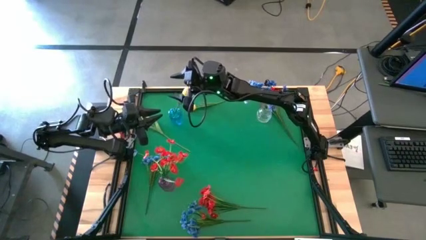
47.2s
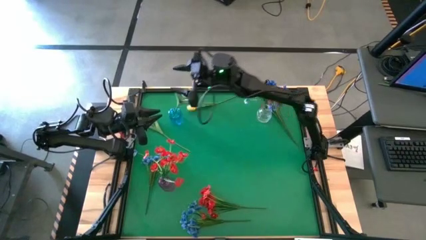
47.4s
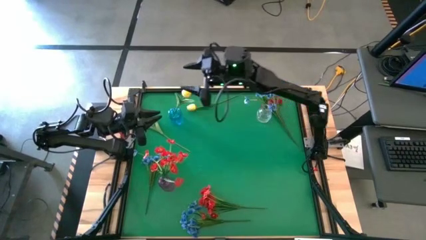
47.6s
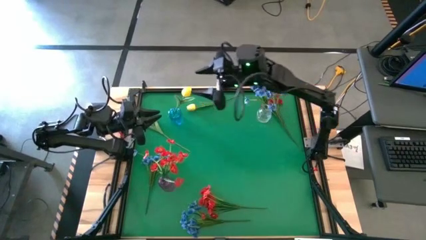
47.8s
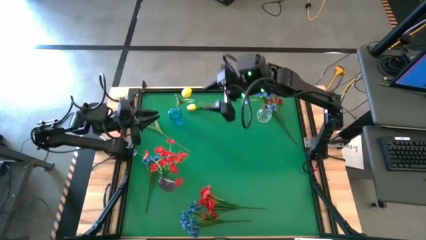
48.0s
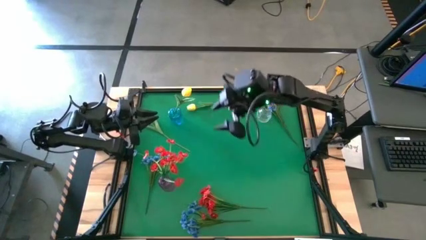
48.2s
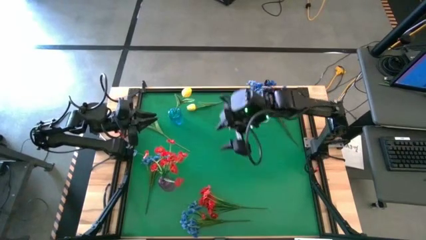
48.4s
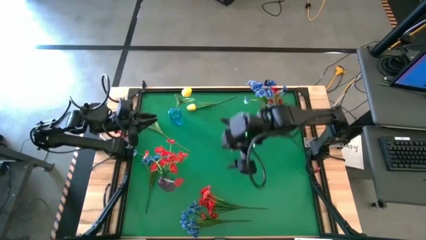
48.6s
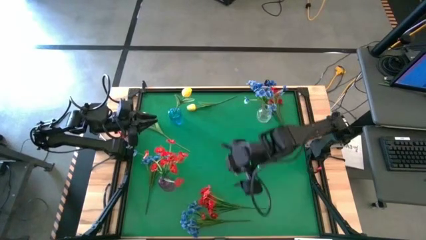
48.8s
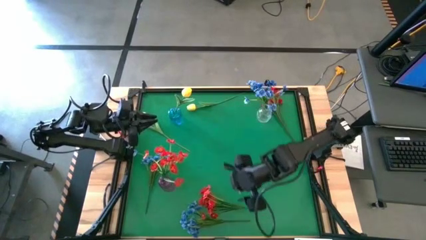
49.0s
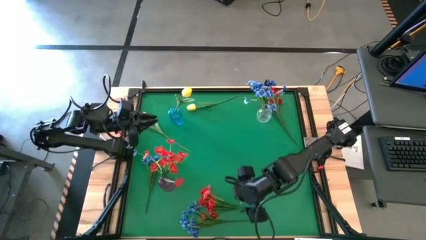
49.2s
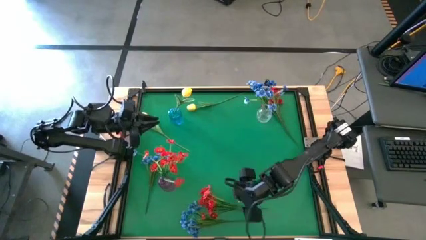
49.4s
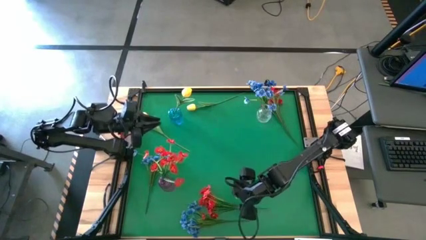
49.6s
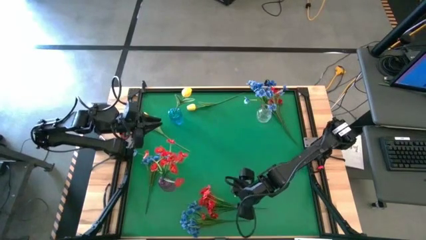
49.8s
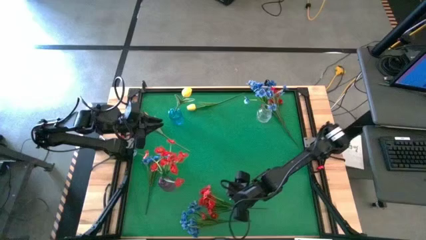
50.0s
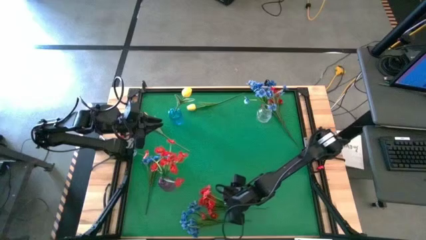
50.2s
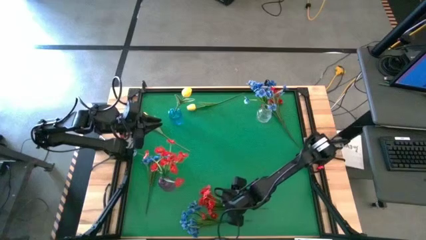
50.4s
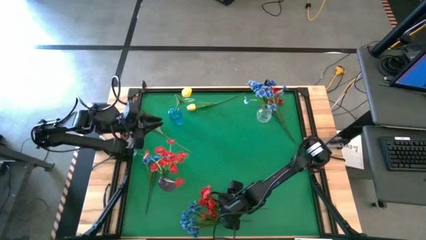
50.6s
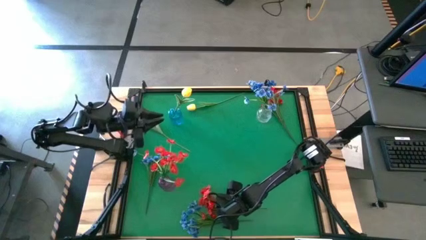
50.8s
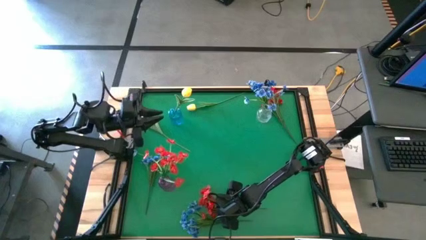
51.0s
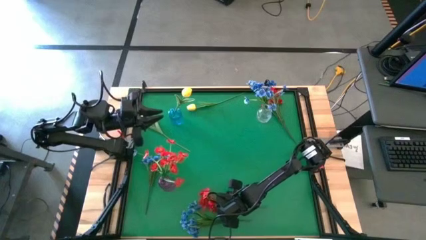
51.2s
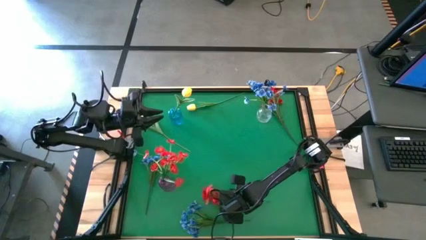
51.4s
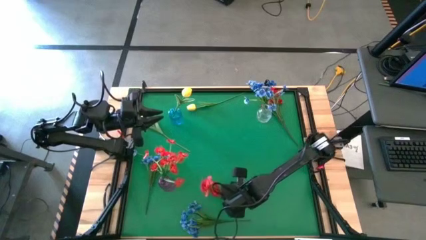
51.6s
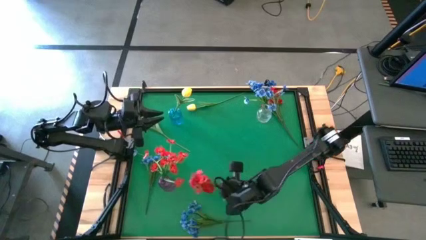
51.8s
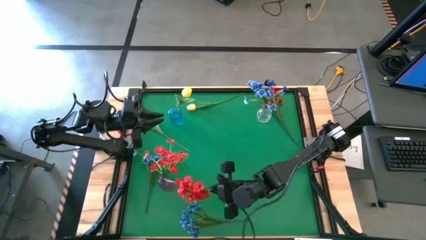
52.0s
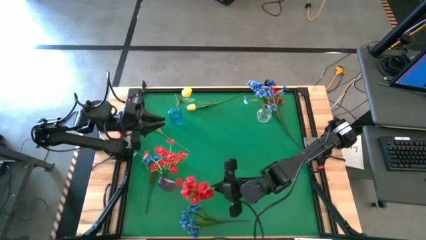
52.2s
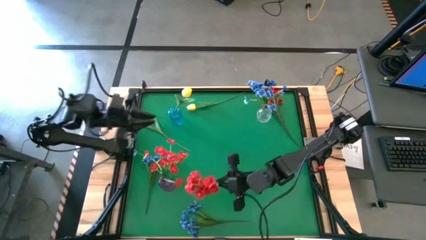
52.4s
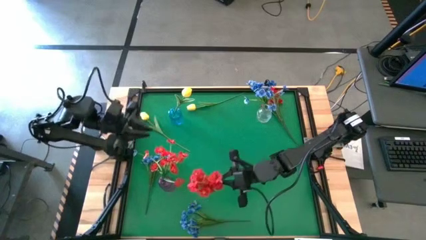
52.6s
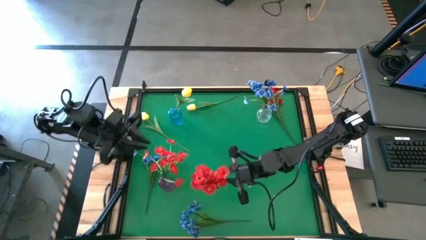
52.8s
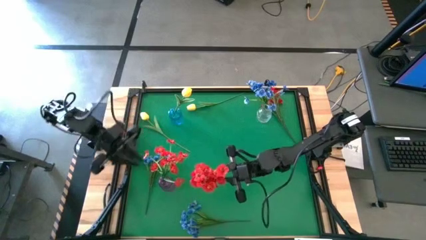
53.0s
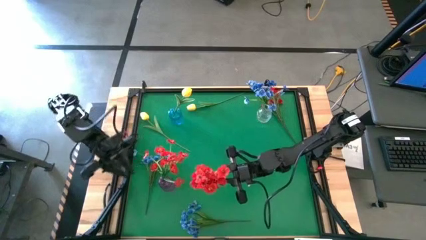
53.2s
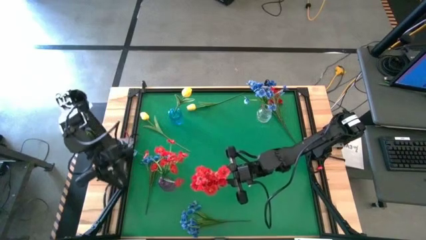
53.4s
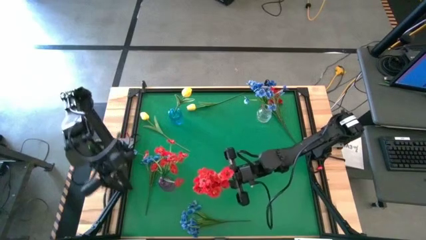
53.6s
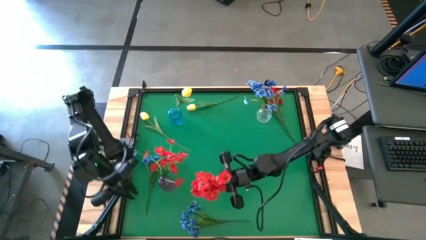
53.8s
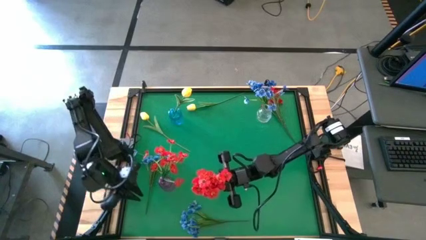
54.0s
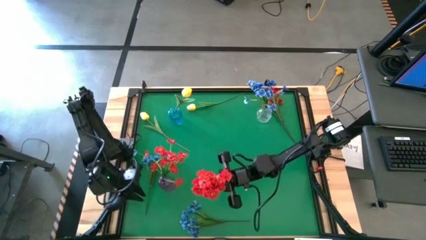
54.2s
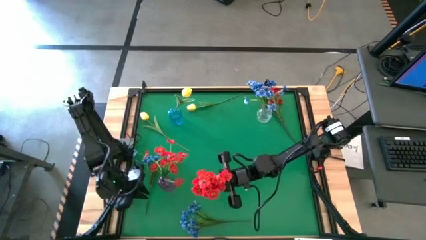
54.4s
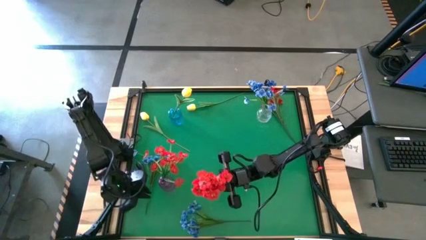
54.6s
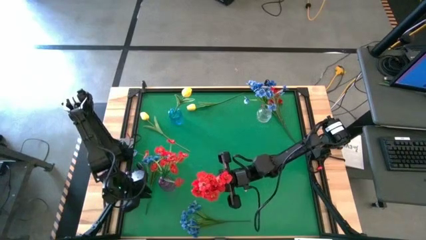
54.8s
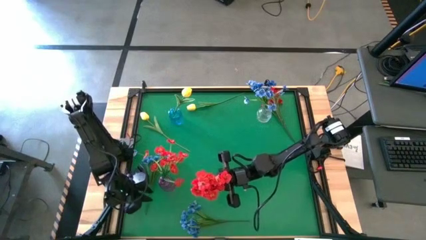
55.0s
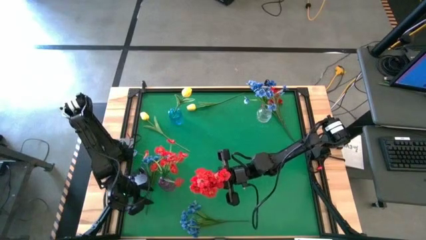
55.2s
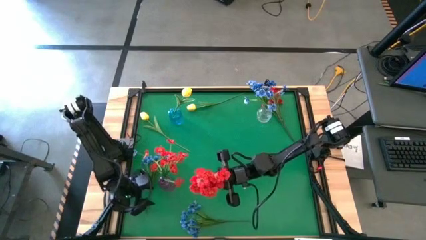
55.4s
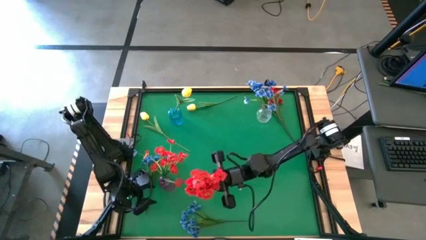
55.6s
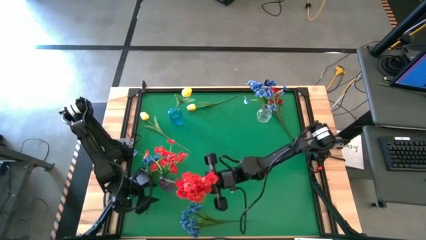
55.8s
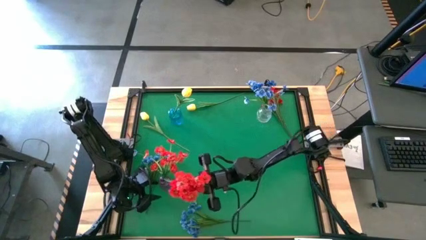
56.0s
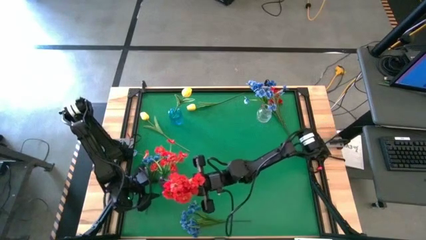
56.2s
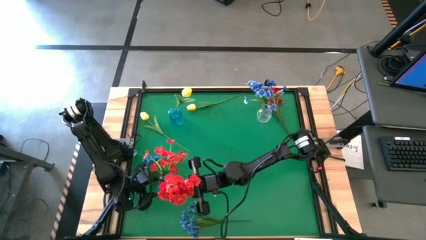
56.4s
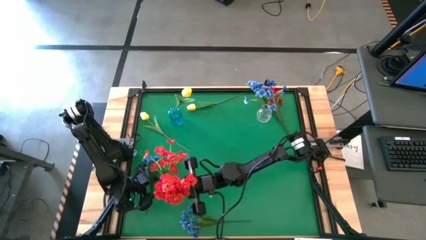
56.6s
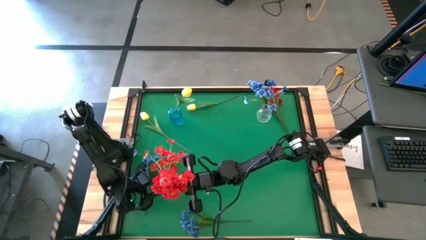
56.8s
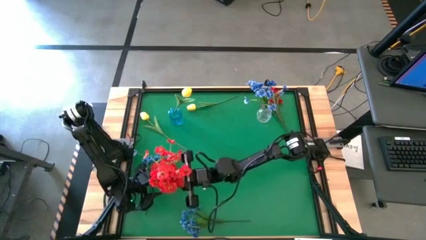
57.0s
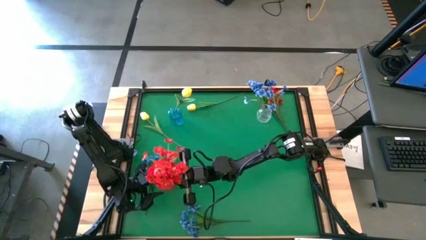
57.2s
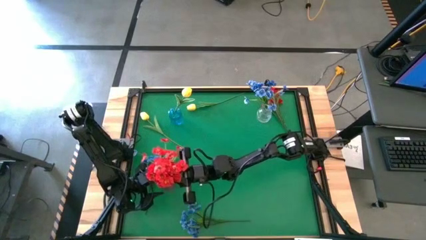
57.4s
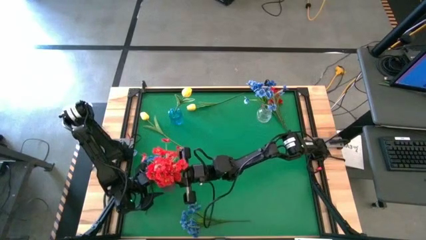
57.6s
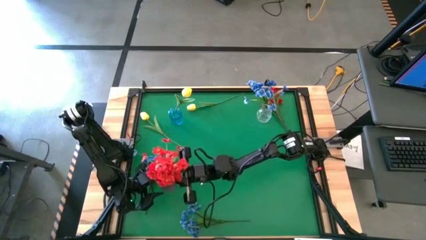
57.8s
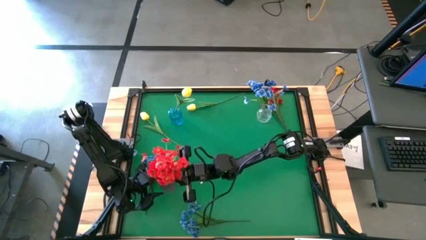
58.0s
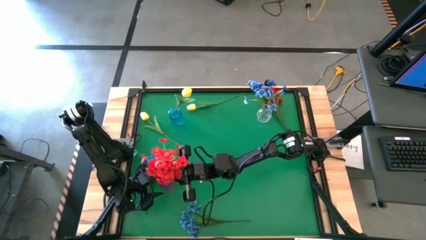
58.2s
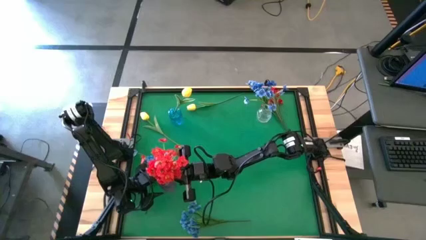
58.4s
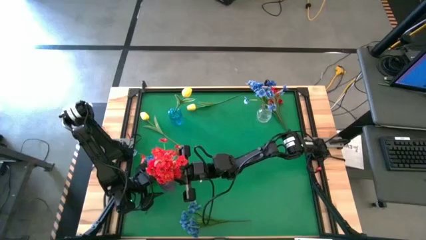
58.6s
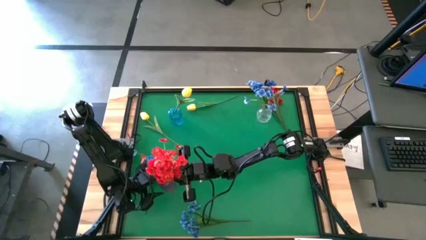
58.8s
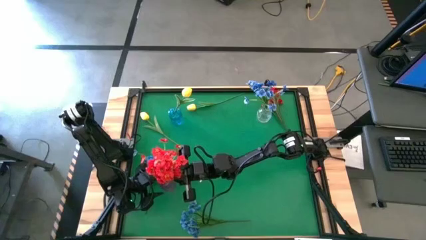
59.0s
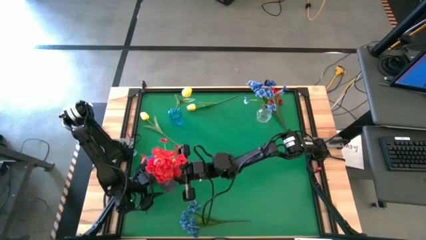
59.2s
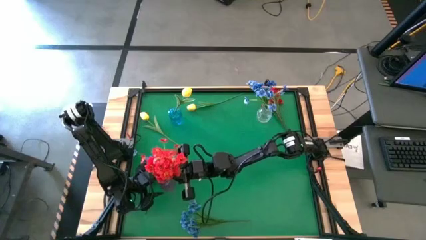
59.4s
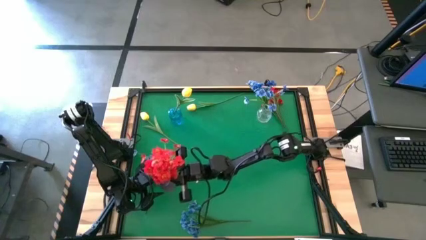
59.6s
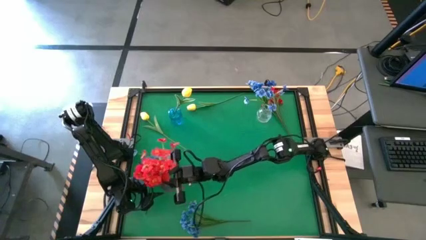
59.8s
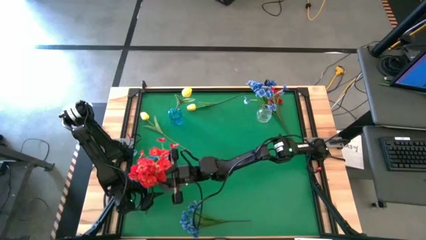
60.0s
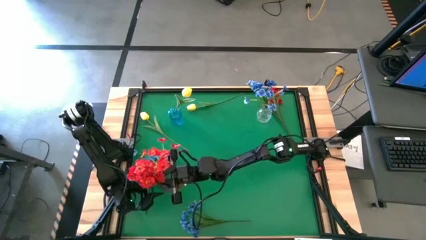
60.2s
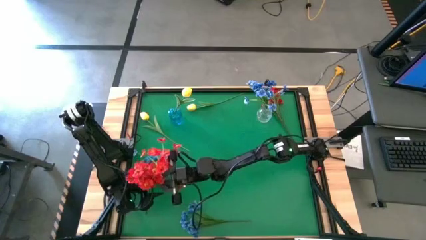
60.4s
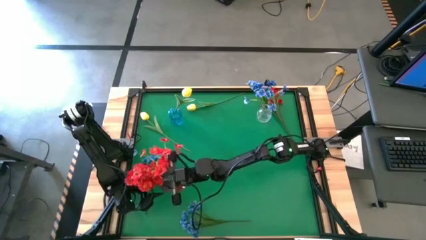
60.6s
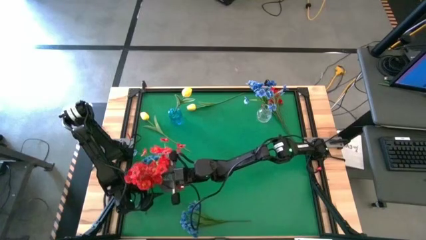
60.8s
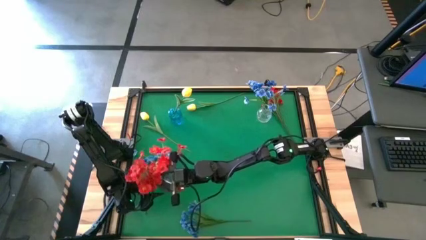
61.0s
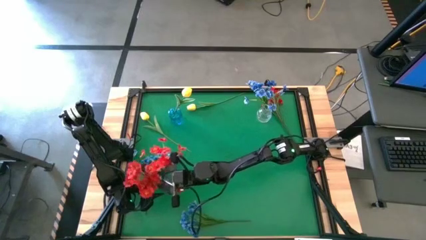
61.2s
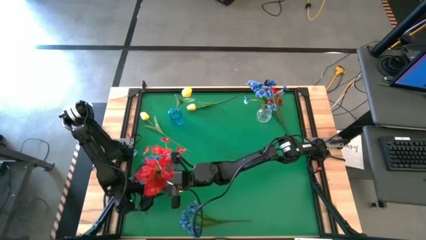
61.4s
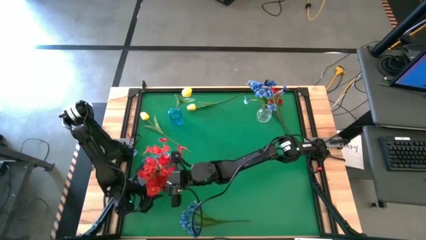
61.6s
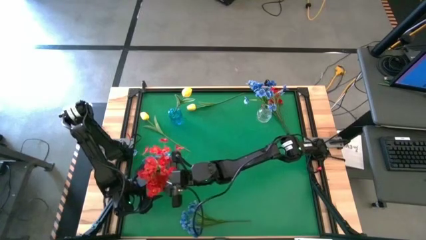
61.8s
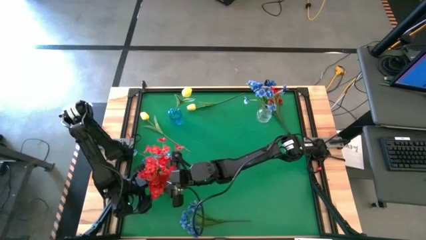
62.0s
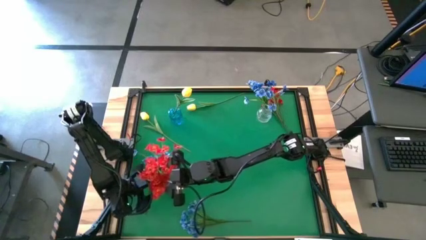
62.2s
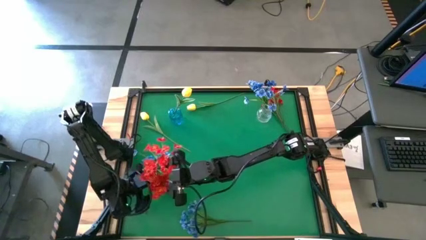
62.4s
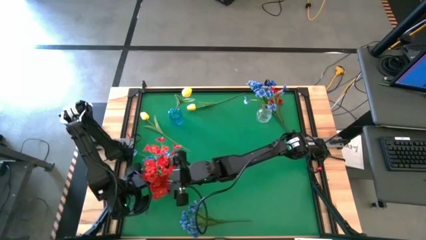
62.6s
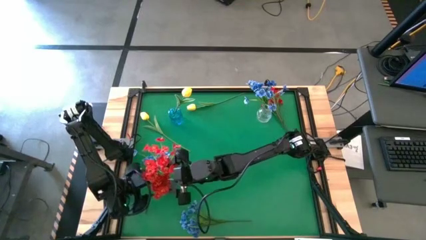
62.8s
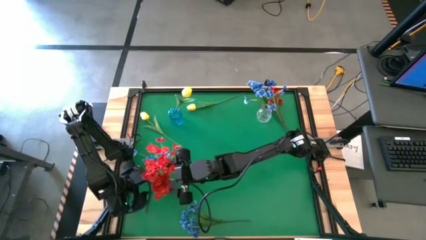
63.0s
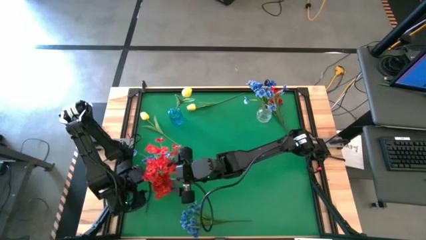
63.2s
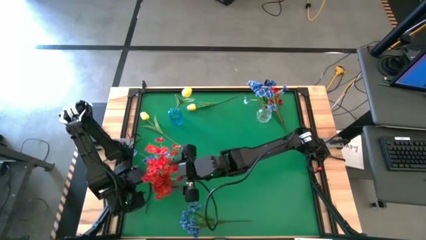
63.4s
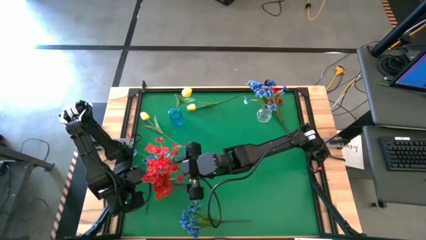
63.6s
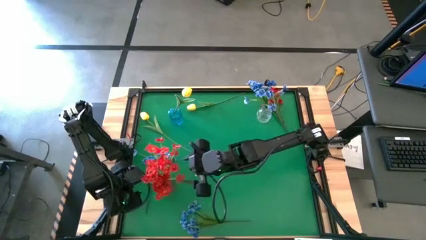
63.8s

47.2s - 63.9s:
Task: Sort flowers into vase by color
Put the bottom red flowers into the purple vase
